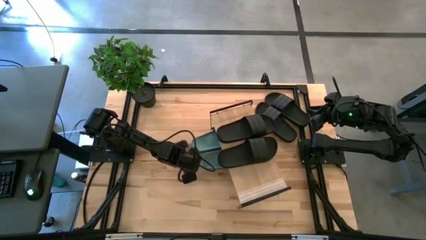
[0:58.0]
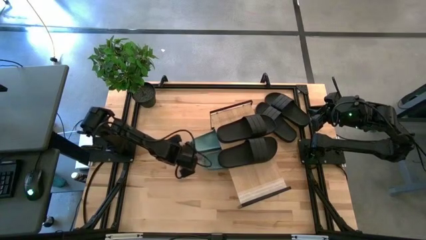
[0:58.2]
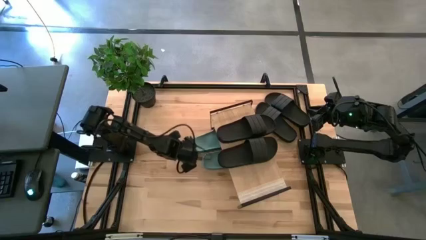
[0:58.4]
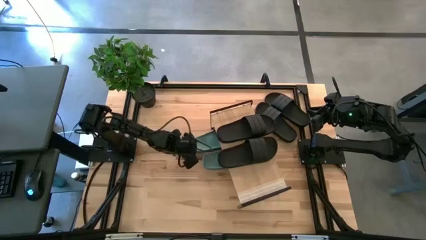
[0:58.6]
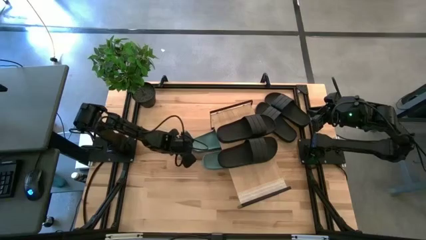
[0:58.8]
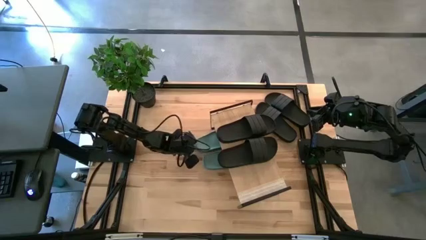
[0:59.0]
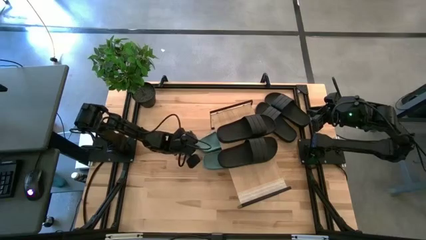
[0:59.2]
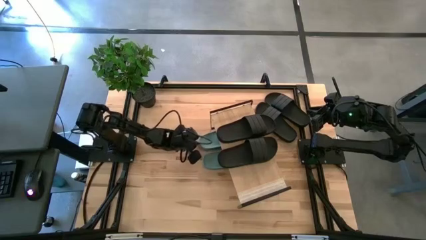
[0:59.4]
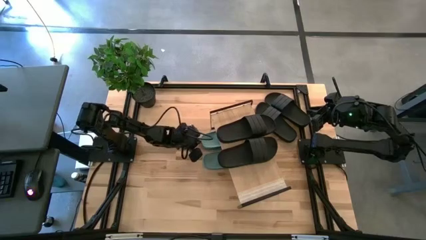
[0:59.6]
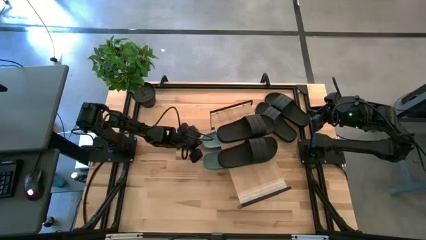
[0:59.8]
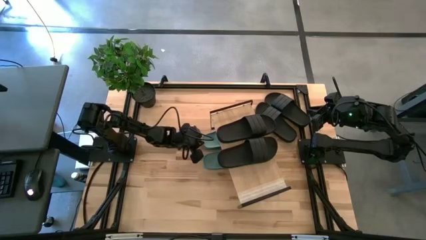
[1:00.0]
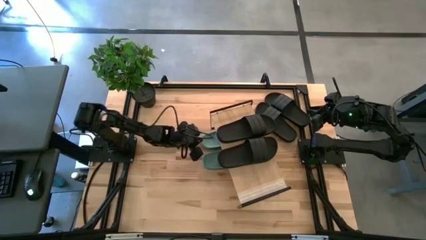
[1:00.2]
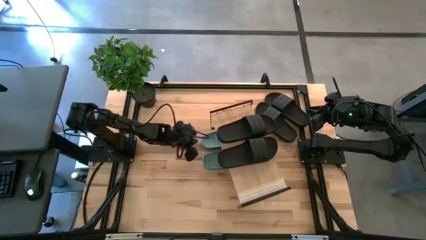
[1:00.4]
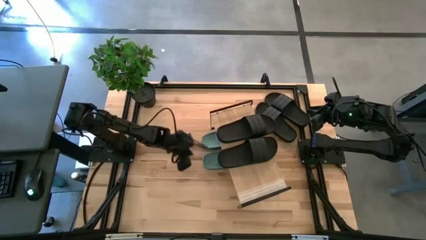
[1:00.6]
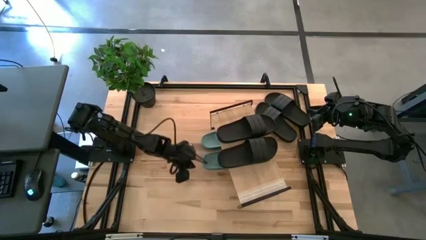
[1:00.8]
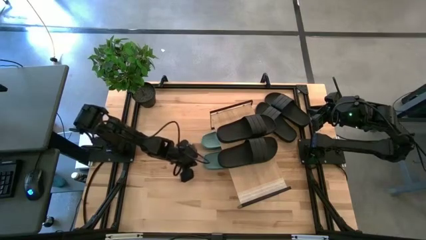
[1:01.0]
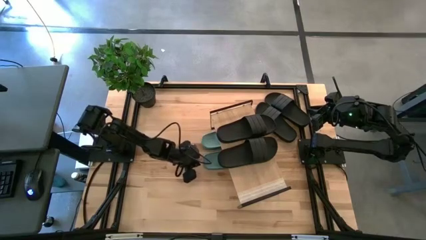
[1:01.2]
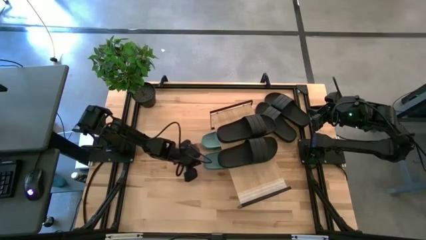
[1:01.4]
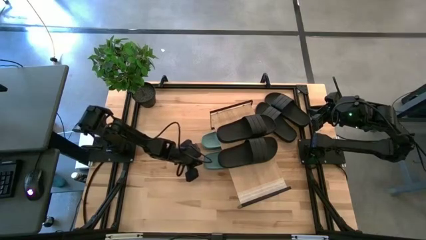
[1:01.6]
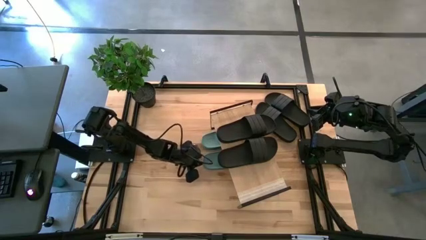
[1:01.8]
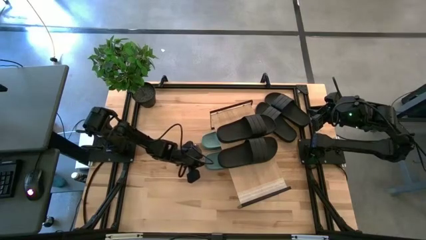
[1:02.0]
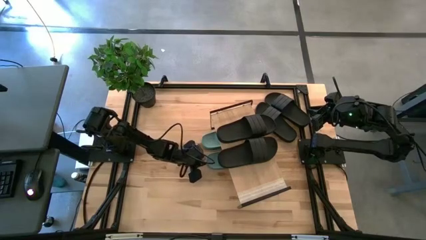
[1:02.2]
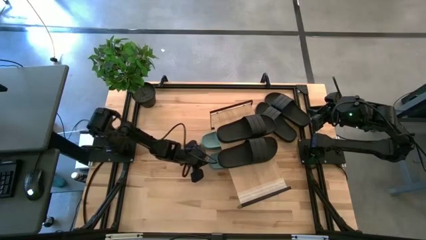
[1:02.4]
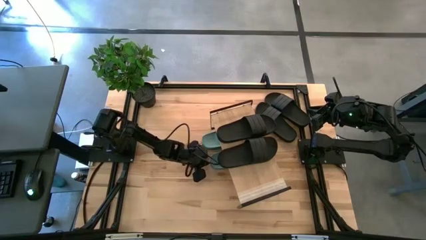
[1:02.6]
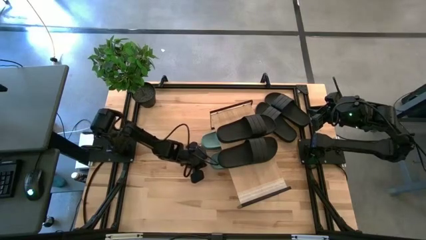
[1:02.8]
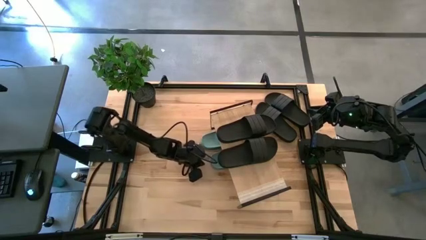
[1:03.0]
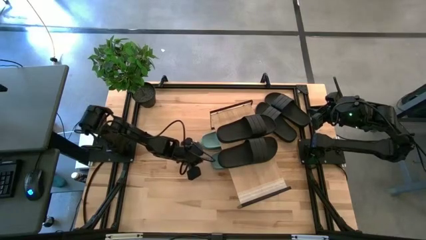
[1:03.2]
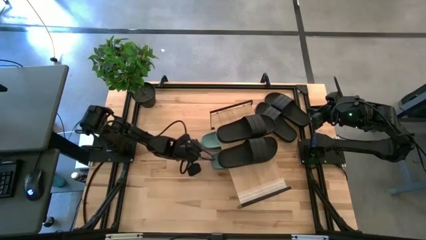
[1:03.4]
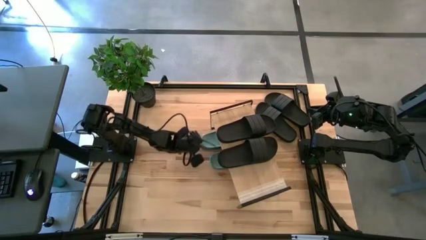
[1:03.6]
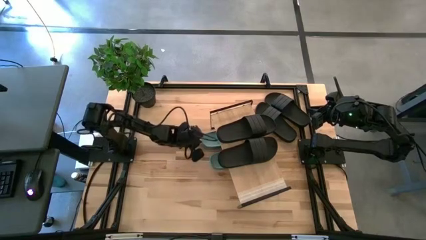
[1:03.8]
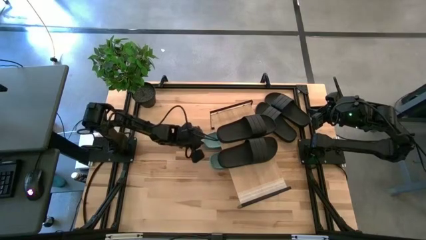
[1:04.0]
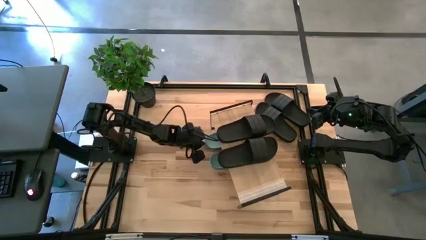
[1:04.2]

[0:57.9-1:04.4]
Task: Pick and place slides into the shelf
Adjust the pair of green slides under the shelf

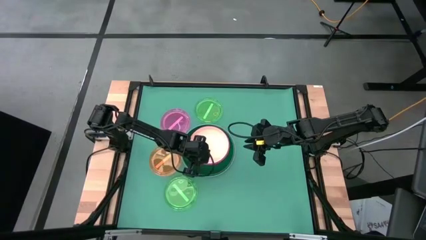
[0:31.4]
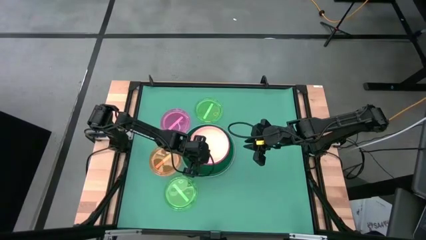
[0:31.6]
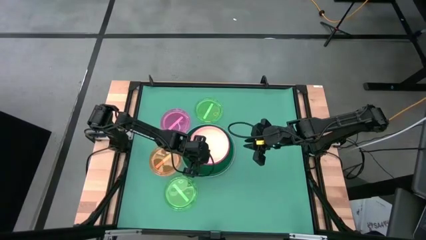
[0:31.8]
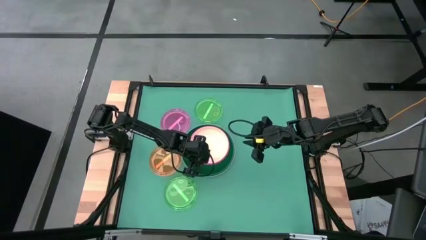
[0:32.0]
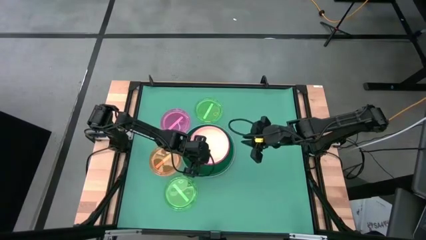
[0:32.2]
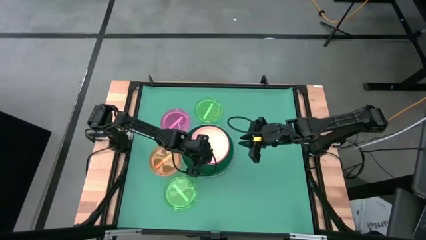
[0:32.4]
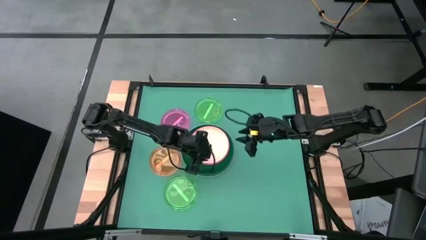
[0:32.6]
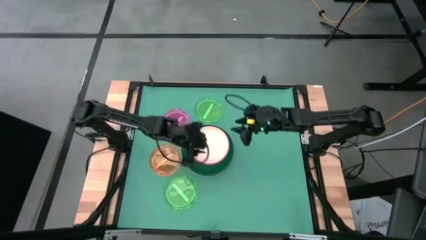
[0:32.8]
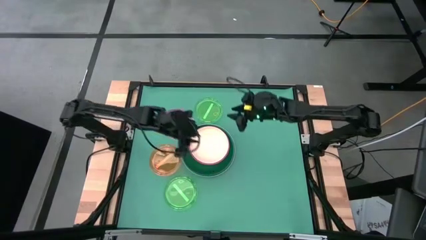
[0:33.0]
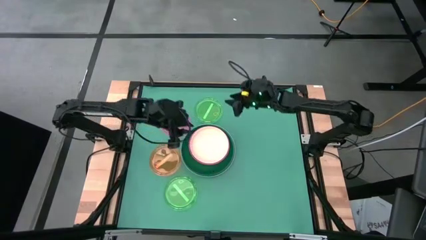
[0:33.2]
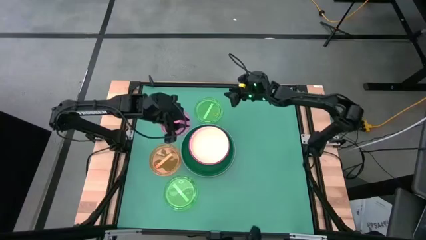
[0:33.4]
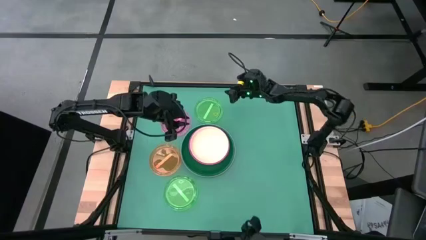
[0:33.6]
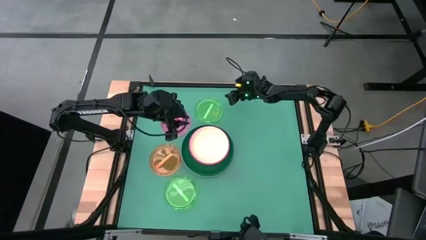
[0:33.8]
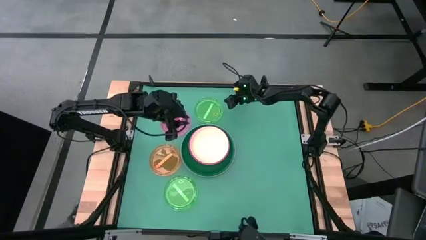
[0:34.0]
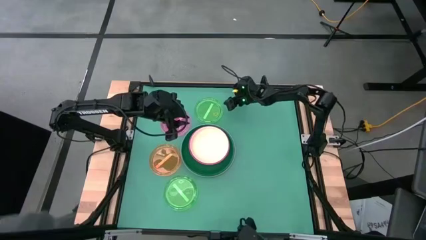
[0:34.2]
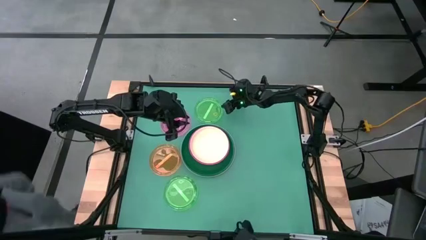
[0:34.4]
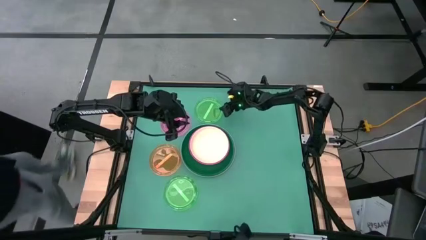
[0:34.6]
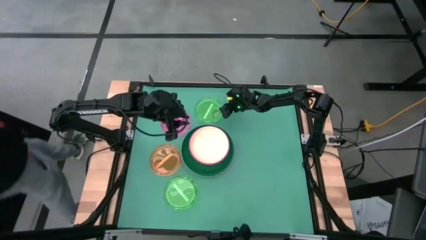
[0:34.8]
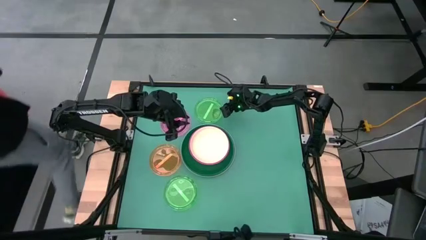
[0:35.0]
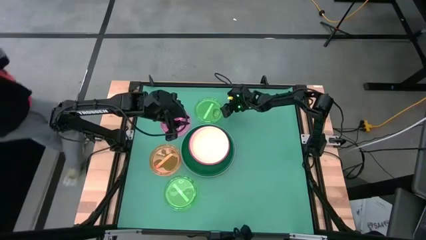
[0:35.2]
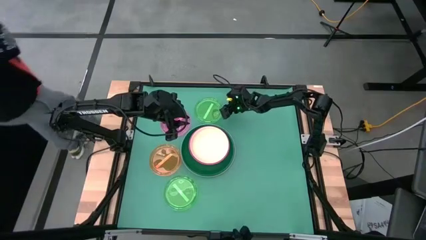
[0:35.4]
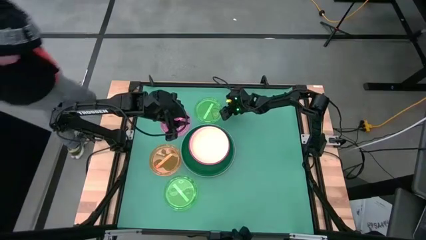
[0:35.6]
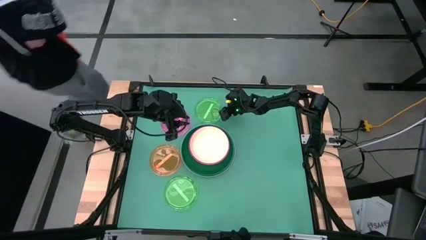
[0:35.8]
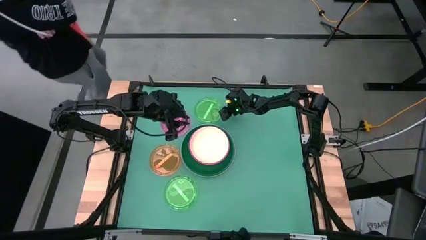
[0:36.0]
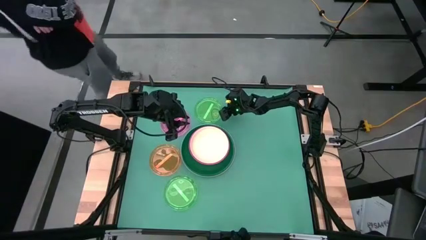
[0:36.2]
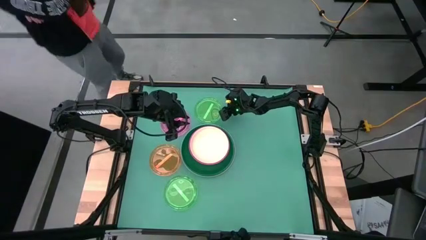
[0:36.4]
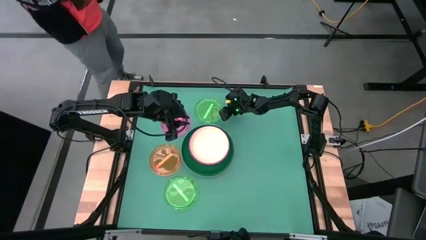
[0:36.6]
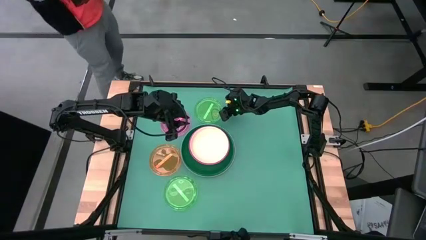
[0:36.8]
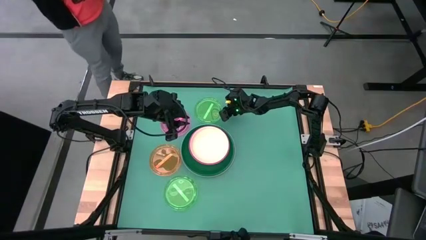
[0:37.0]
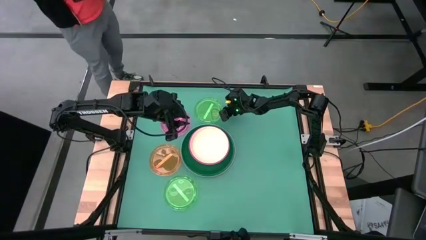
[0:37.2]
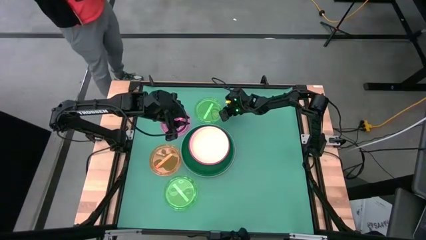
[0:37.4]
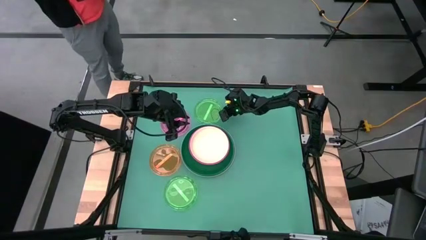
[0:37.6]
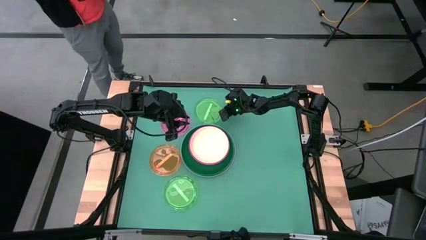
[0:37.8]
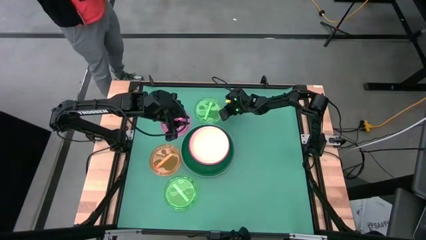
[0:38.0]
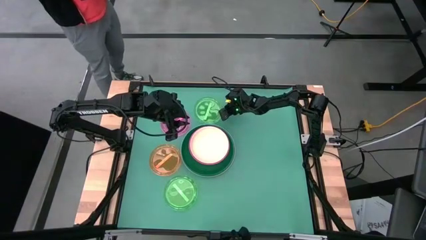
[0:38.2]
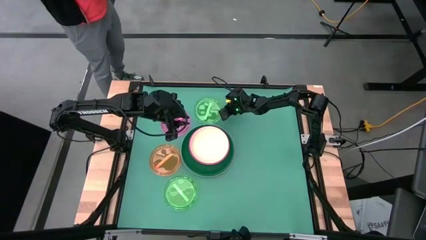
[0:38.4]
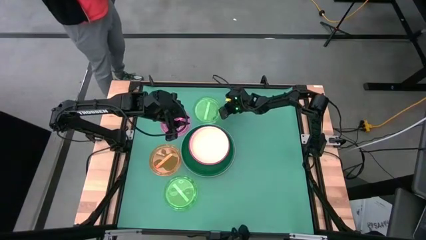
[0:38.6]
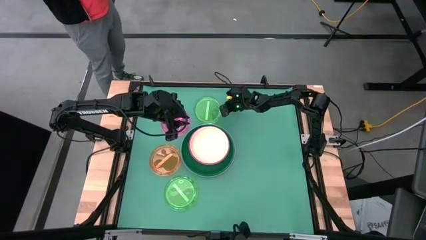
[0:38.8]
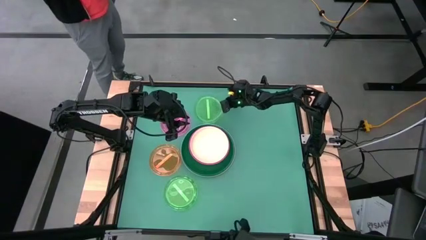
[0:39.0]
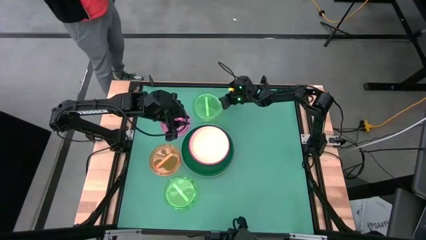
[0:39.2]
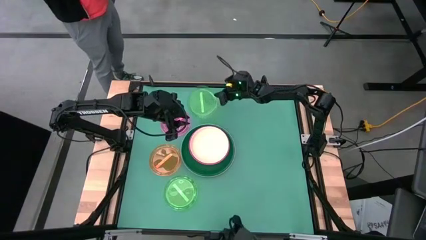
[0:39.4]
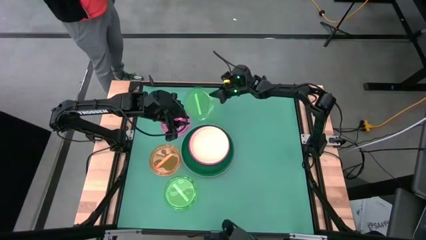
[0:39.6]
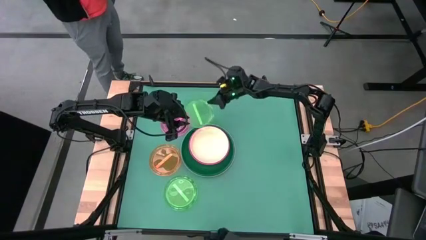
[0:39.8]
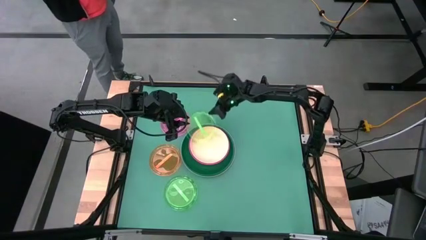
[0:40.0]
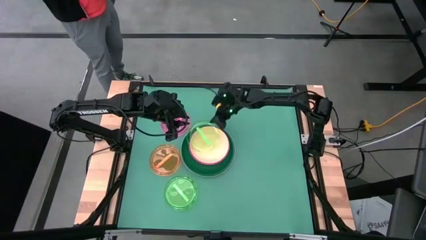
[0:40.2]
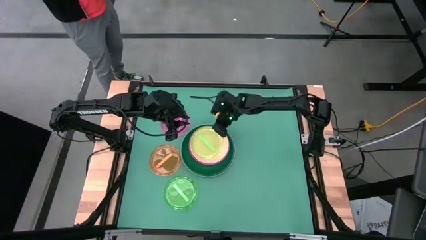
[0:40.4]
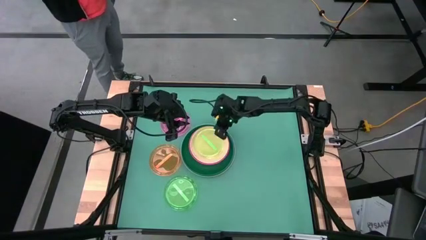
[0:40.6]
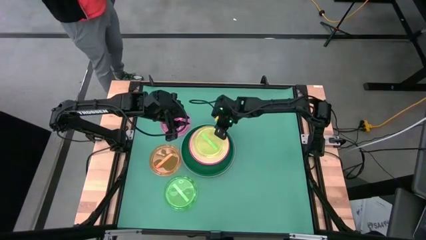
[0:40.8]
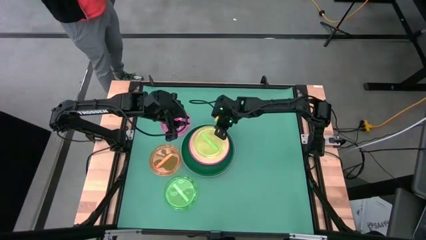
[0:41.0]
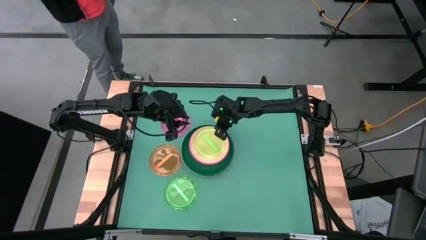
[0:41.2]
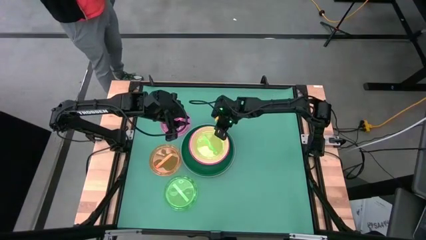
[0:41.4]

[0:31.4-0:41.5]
Task: Stack plastic plates
Stack the top transparent green plate on top of the peach plate
